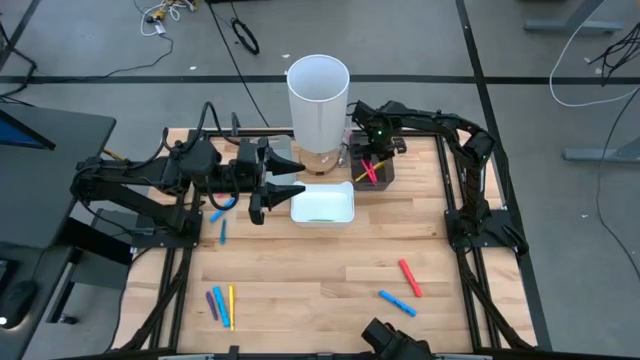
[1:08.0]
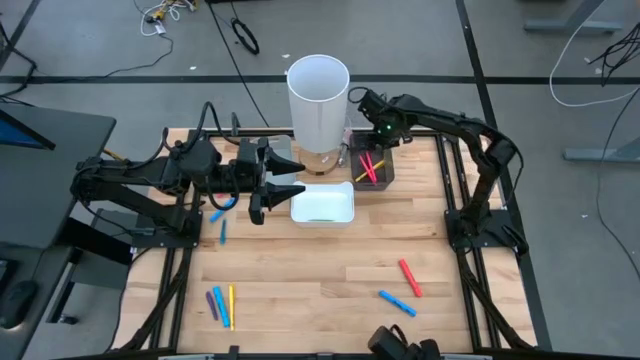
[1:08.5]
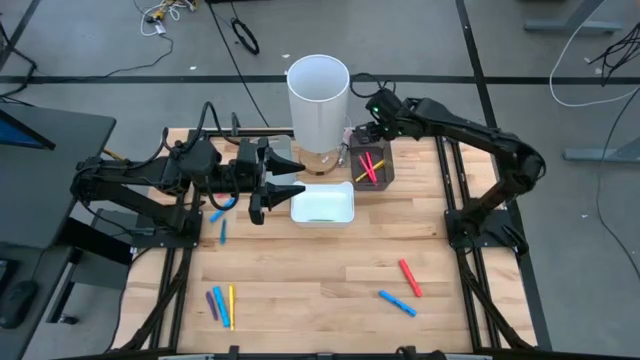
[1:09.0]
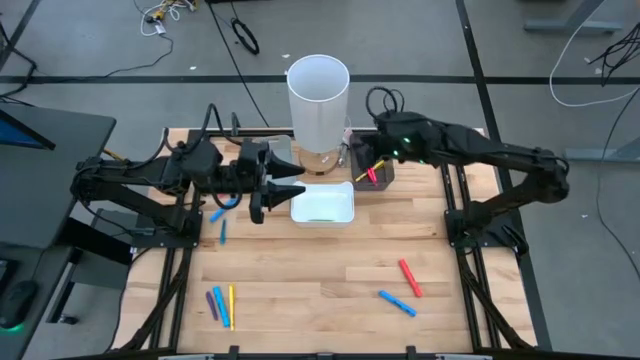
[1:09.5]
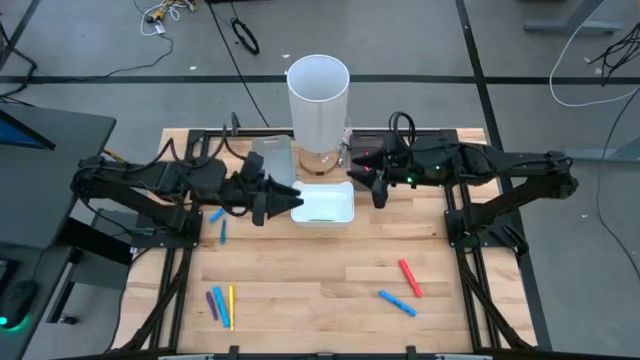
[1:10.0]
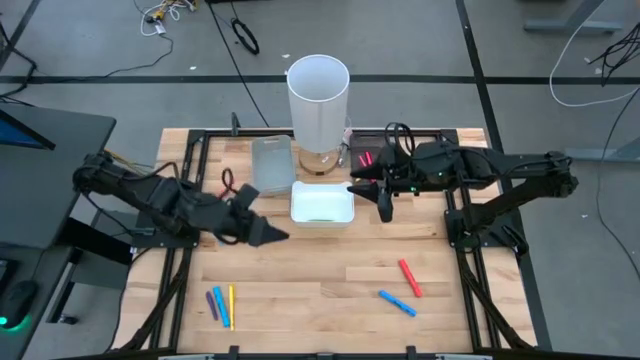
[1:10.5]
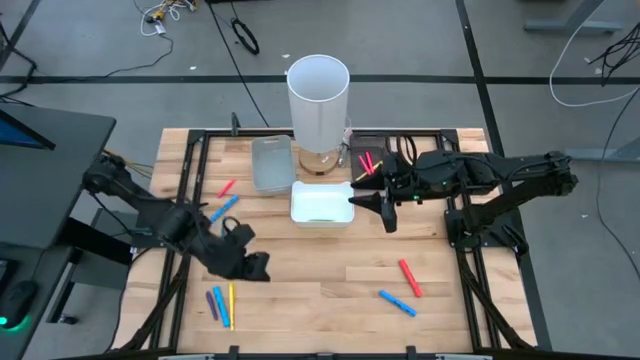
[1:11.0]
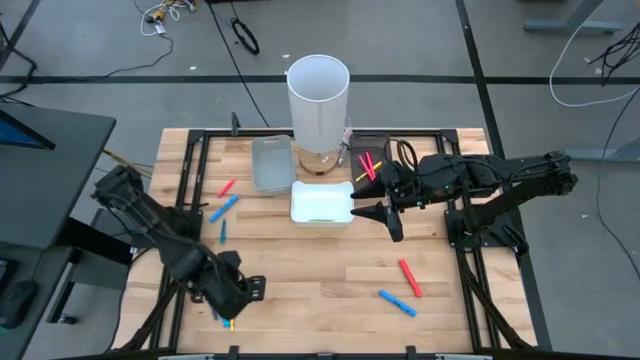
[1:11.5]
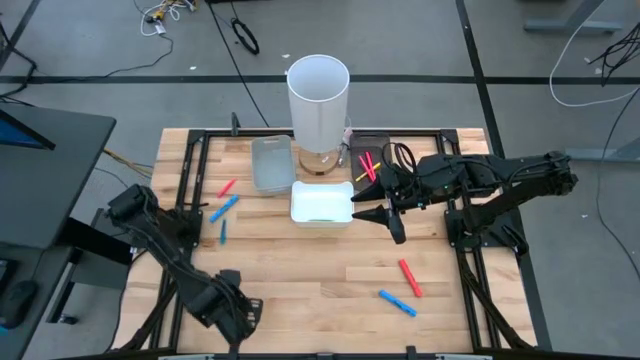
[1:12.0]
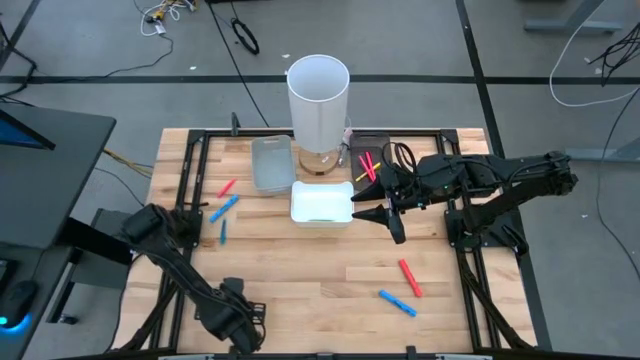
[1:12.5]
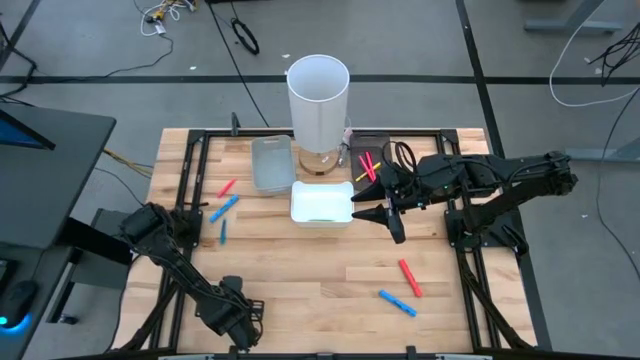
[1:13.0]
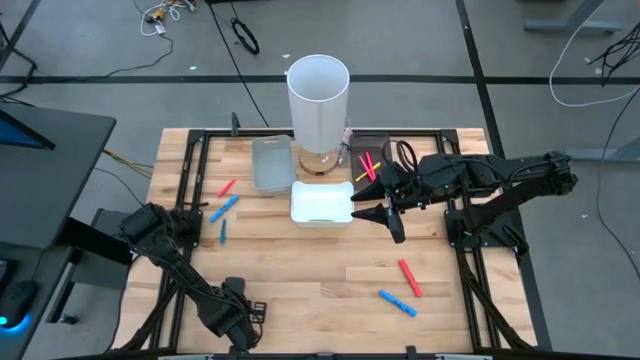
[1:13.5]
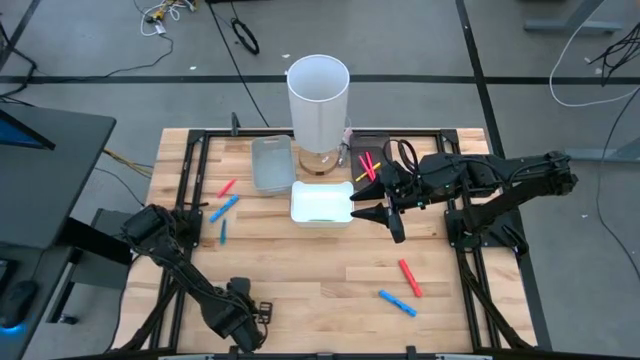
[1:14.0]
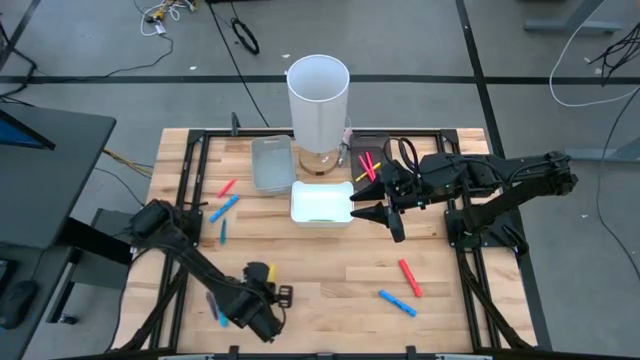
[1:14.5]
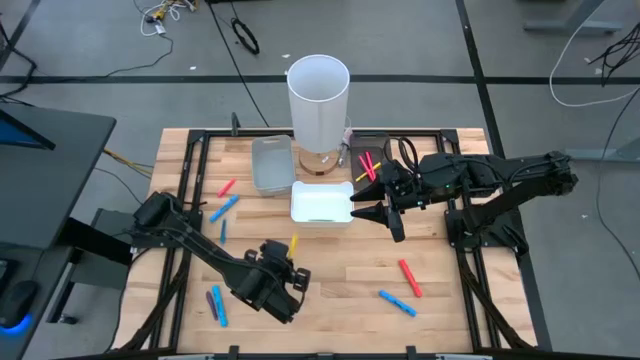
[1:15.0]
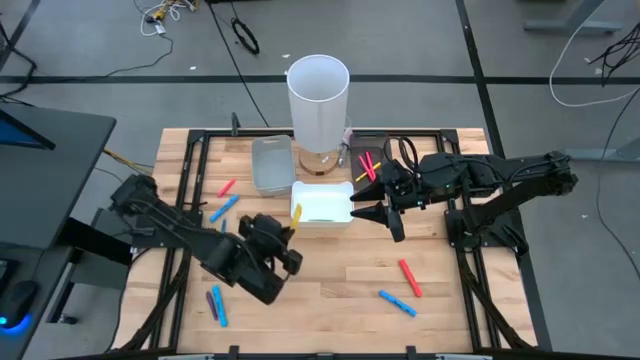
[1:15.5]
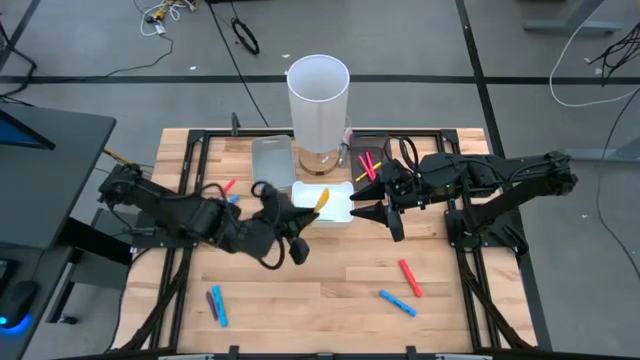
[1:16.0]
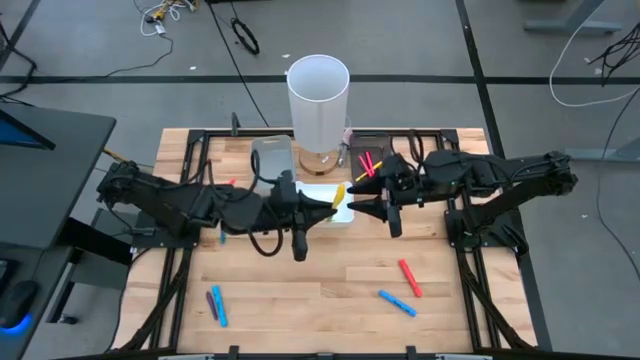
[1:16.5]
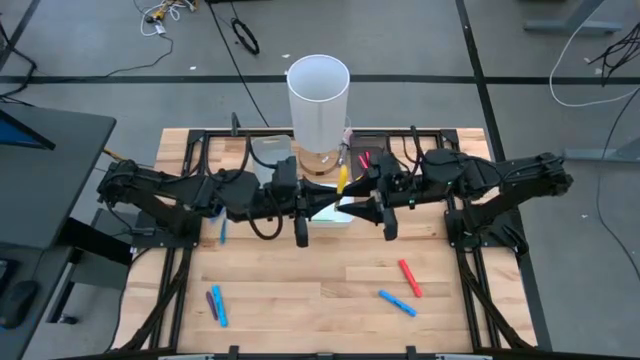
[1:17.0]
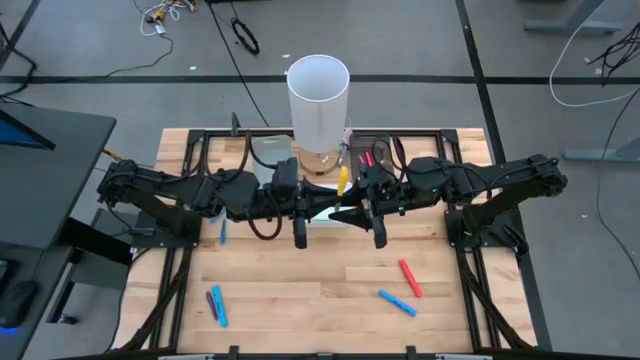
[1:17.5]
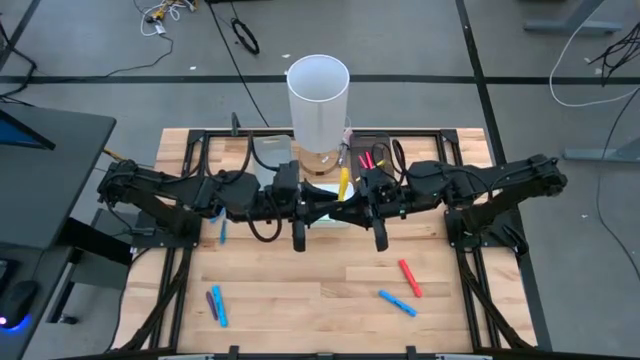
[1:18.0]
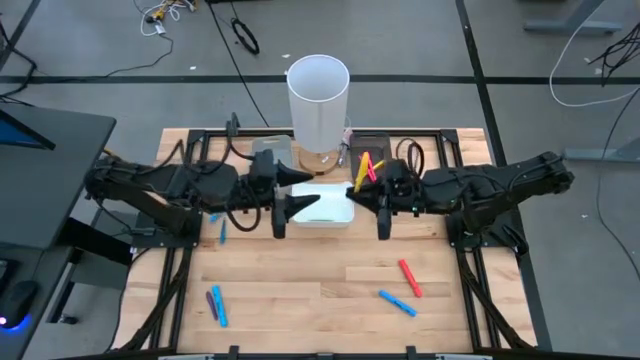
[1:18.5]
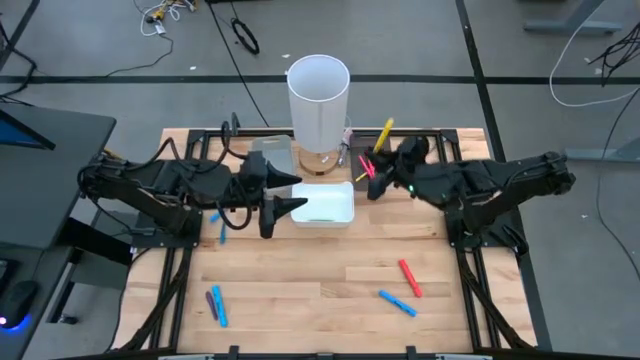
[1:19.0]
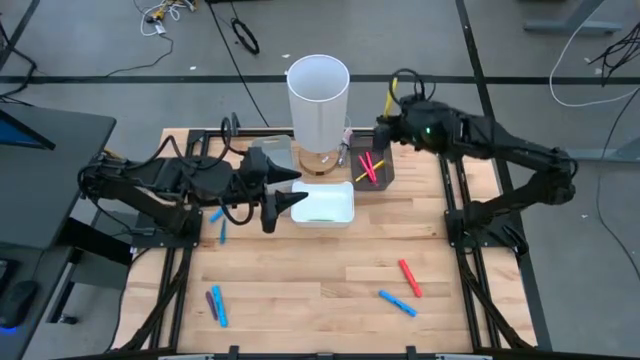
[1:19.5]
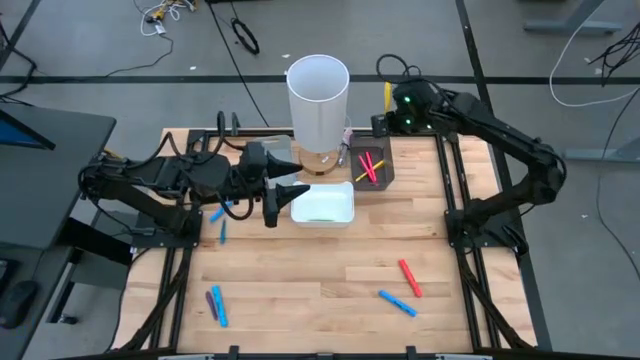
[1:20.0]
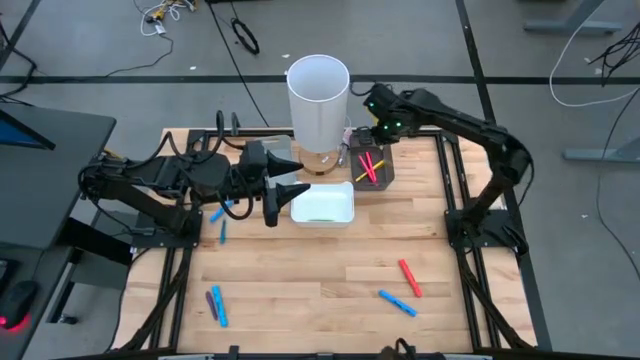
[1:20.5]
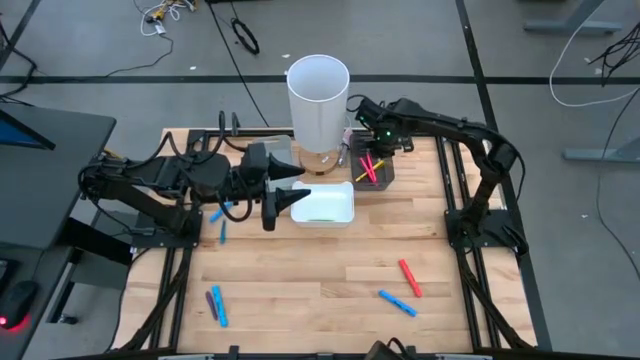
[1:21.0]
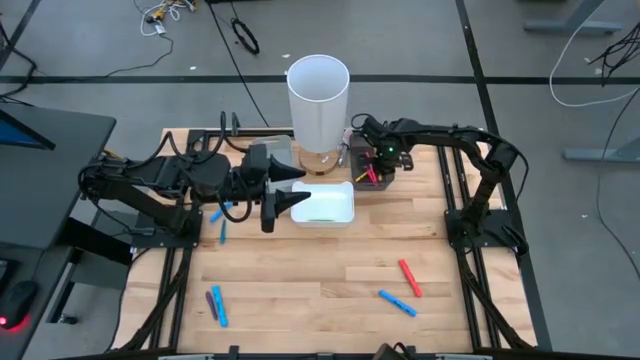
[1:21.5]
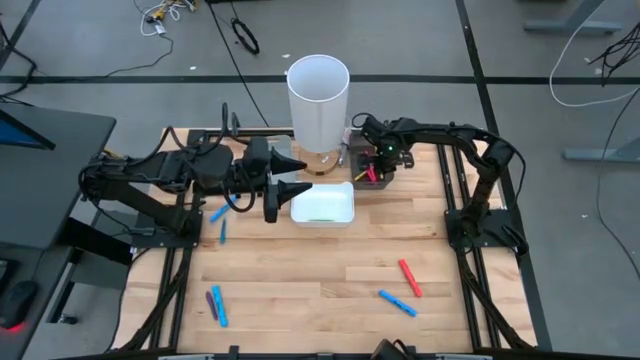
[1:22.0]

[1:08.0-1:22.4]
Task: Pick & Place Markers
Put the yellow marker pen into the black bin

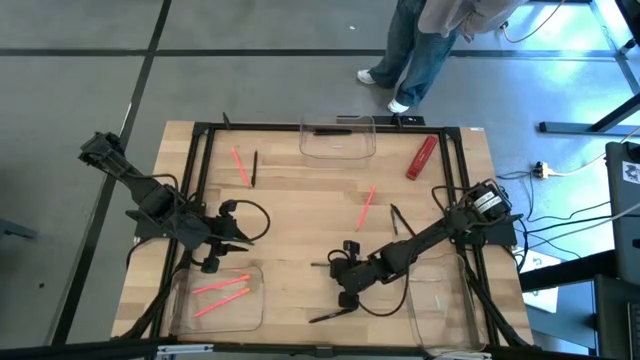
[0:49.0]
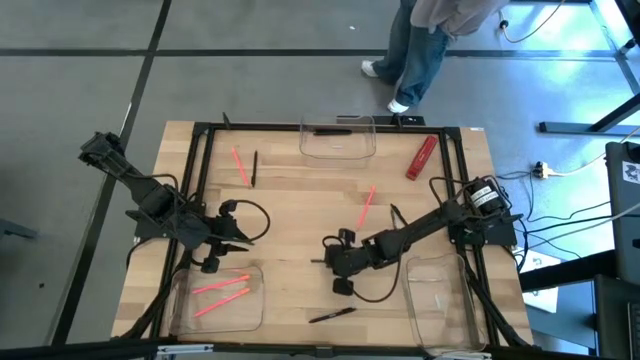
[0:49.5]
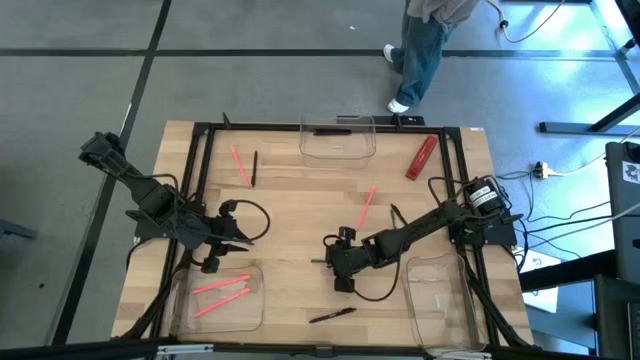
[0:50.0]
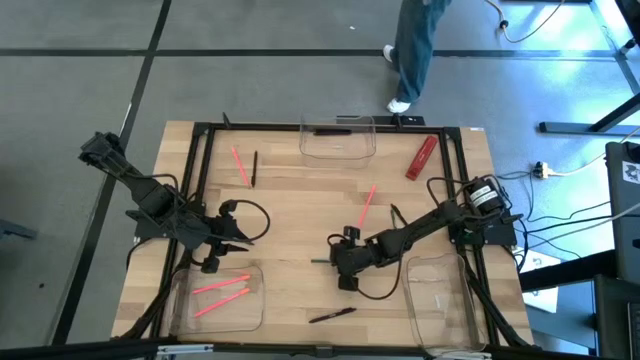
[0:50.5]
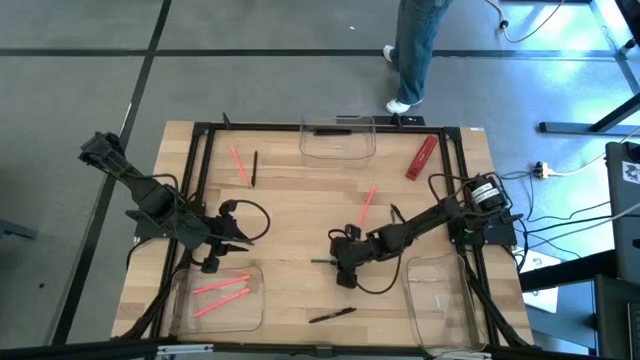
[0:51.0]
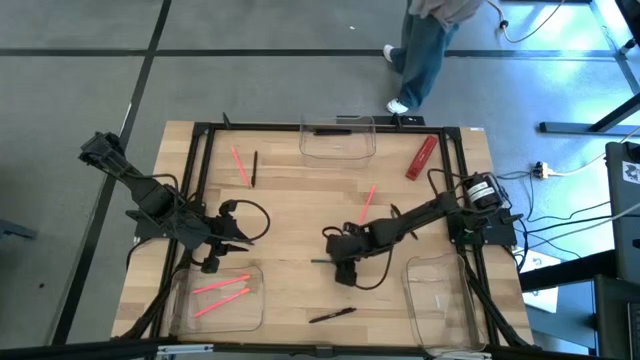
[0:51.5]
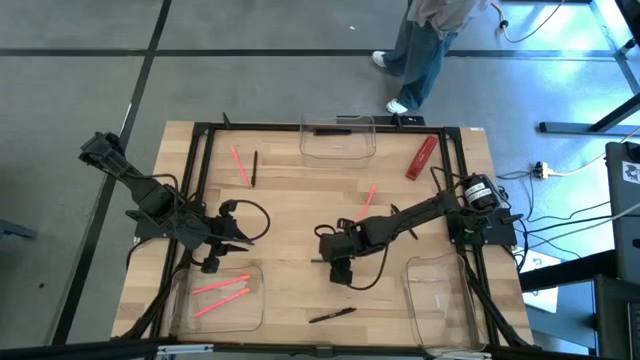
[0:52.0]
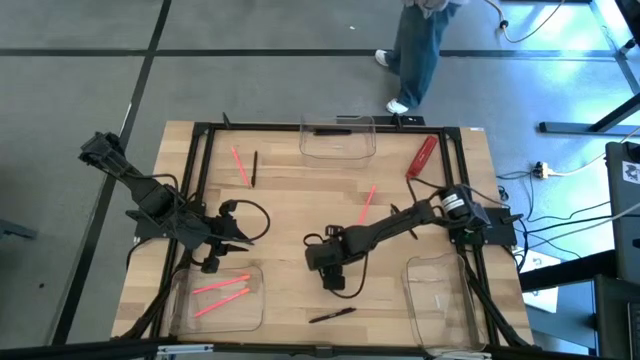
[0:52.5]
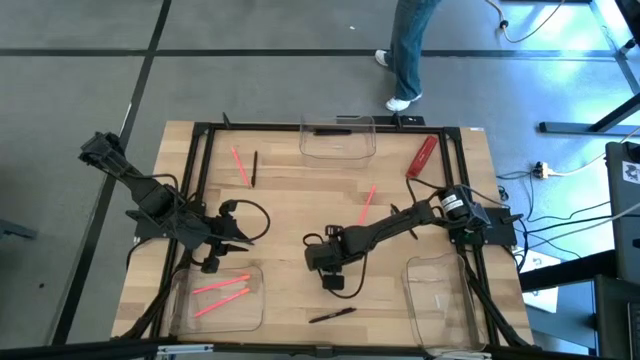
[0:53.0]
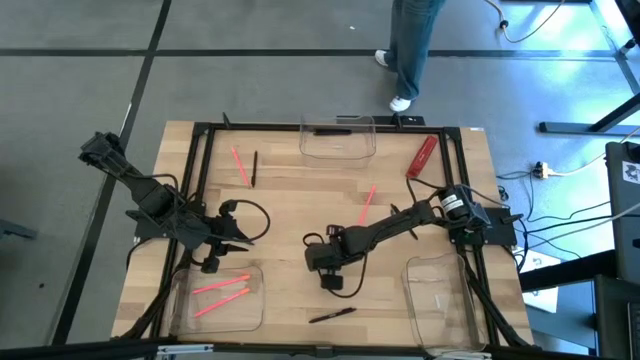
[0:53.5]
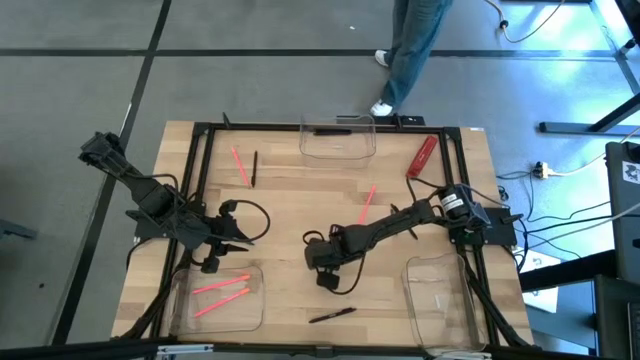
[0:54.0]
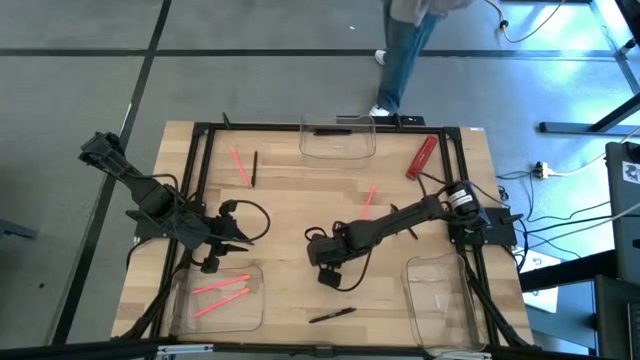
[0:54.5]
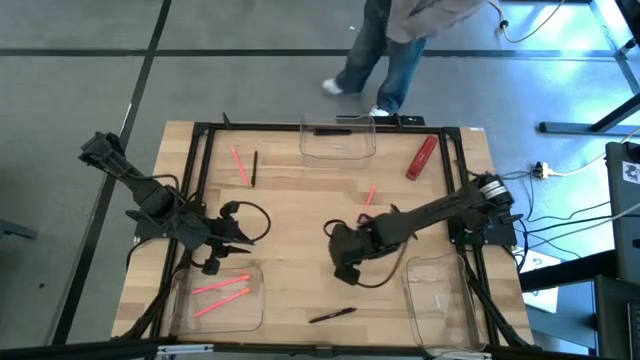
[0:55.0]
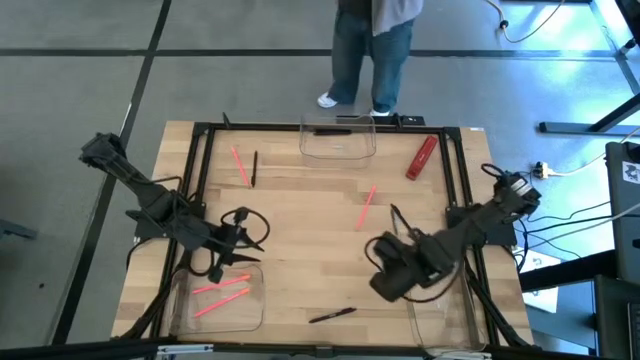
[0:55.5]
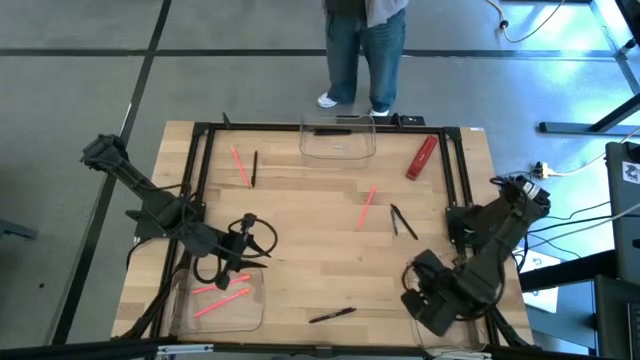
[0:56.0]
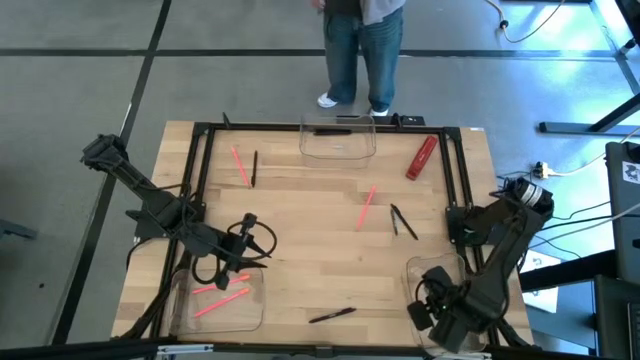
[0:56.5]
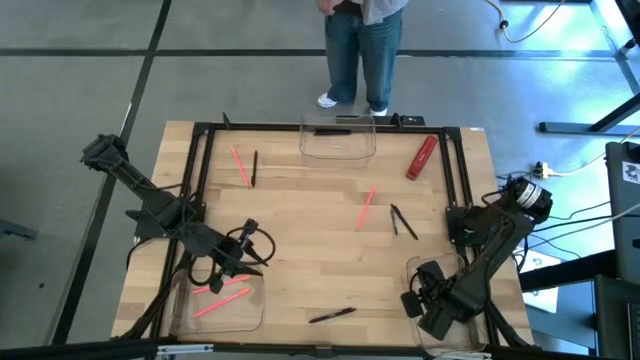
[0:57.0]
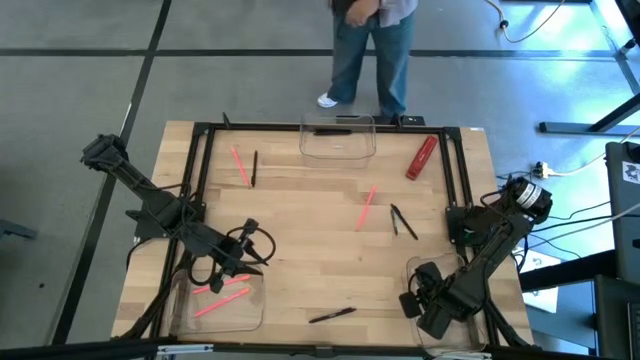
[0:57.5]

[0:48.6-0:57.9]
Task: Sort crayons/erasers/pens/pencils in bins
Put the green crayon into the bottom right transparent bin
